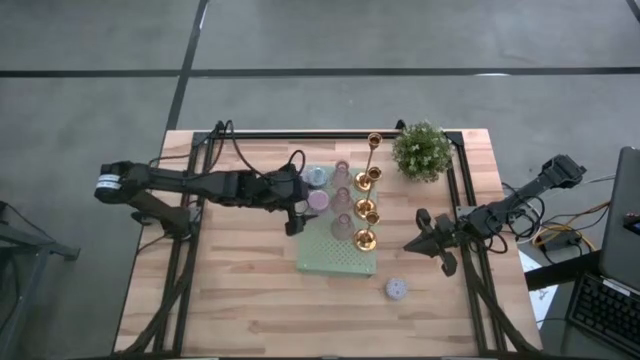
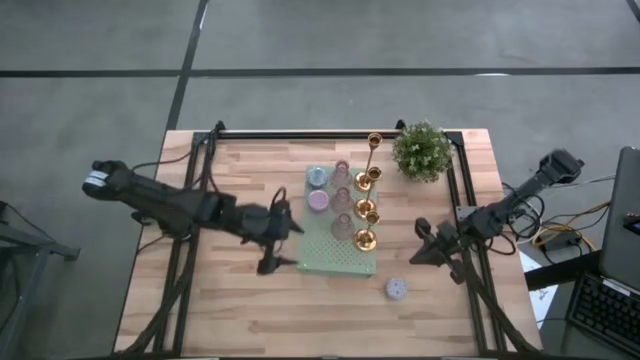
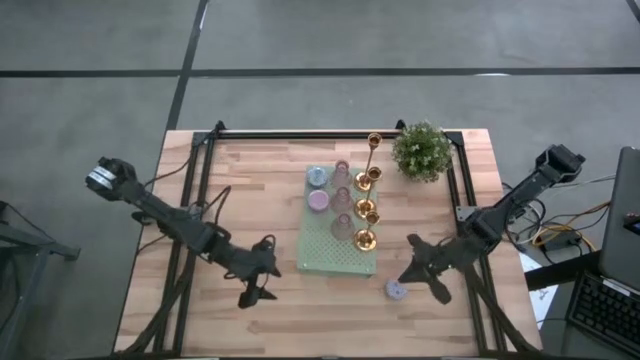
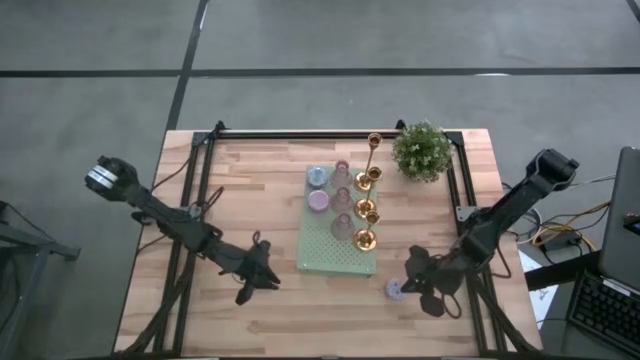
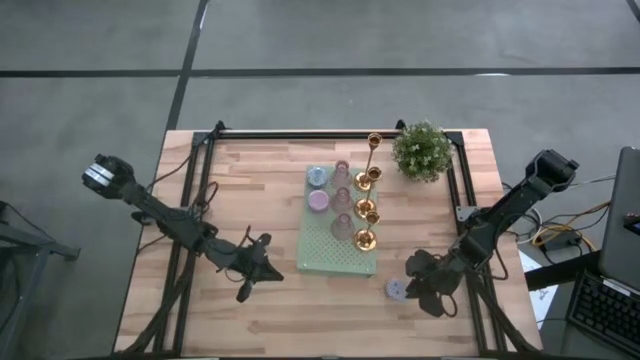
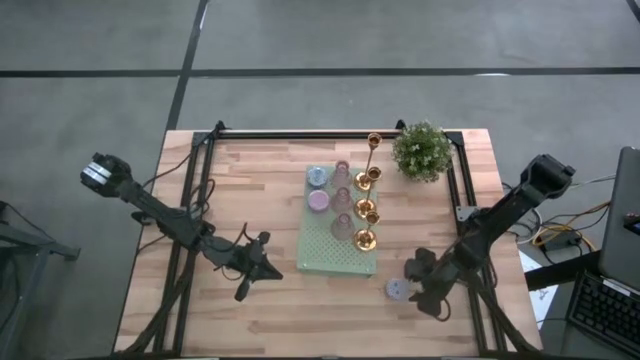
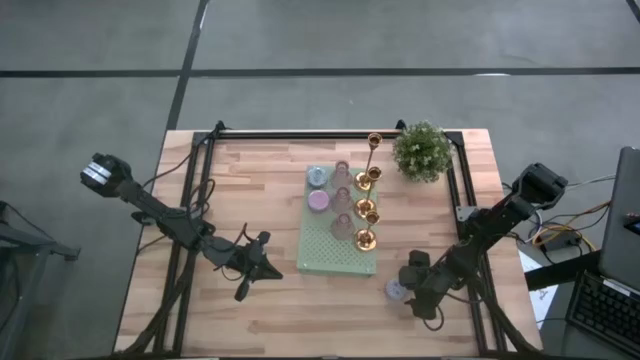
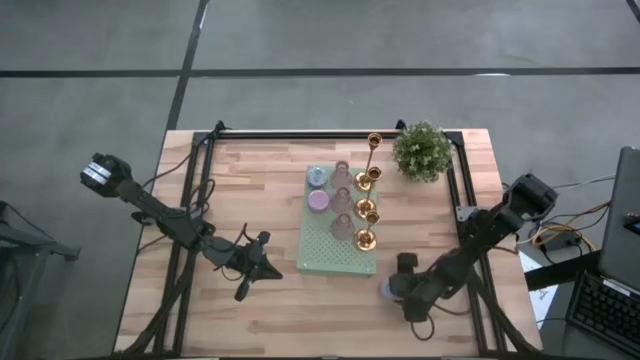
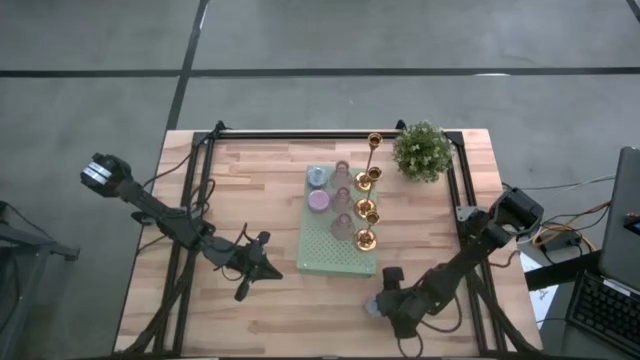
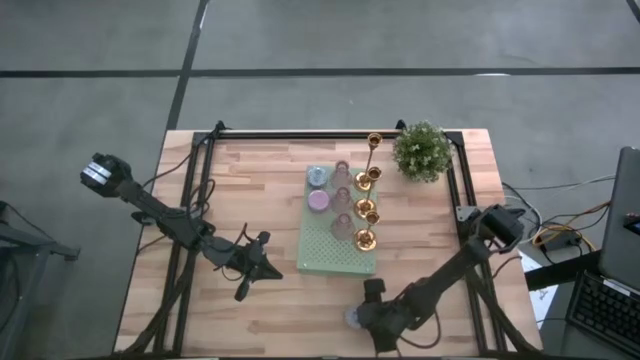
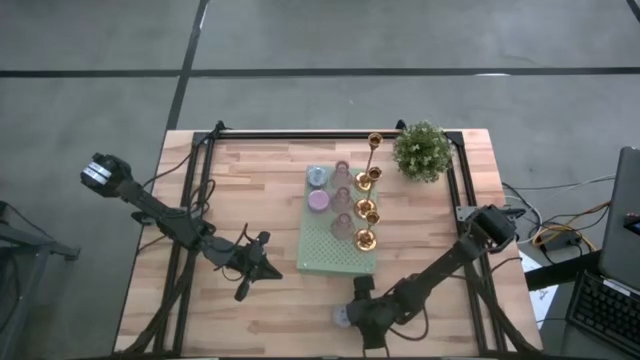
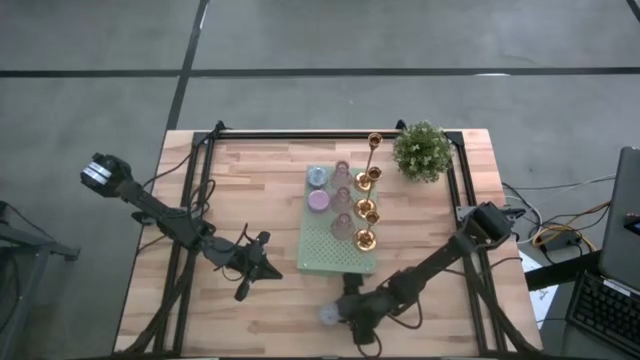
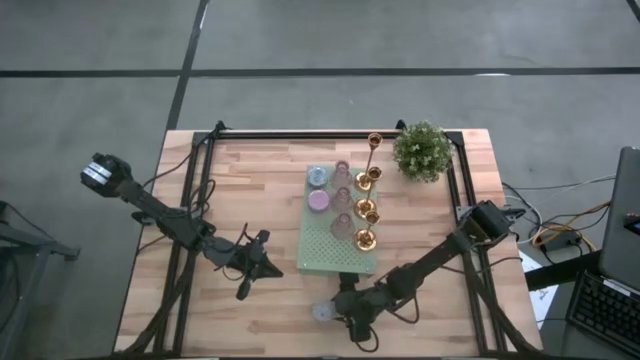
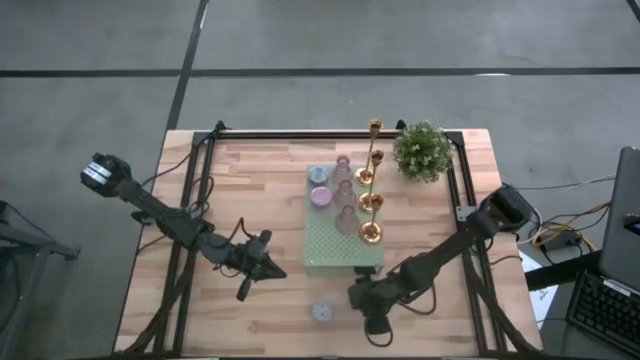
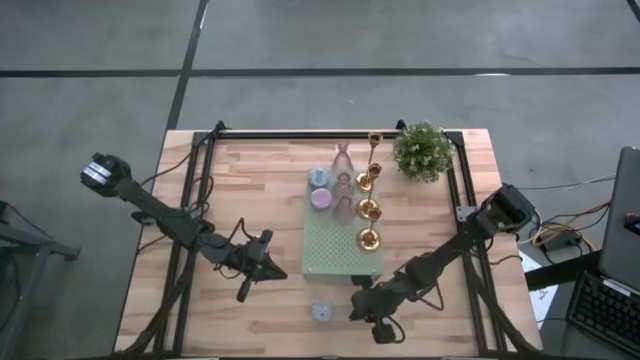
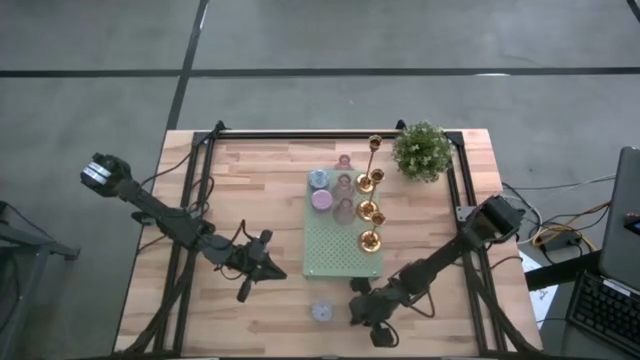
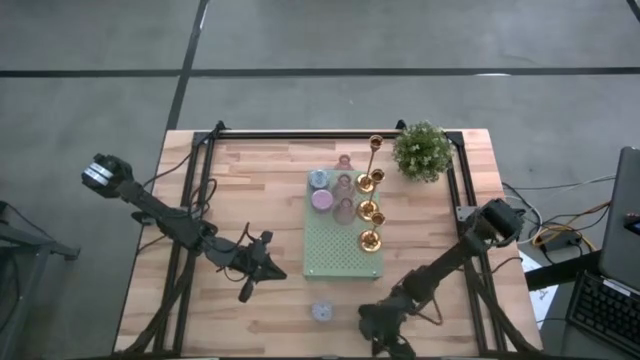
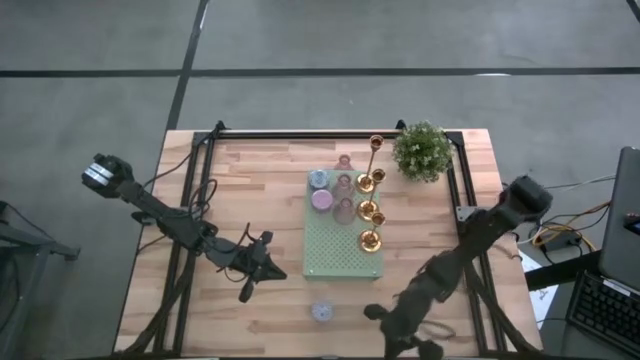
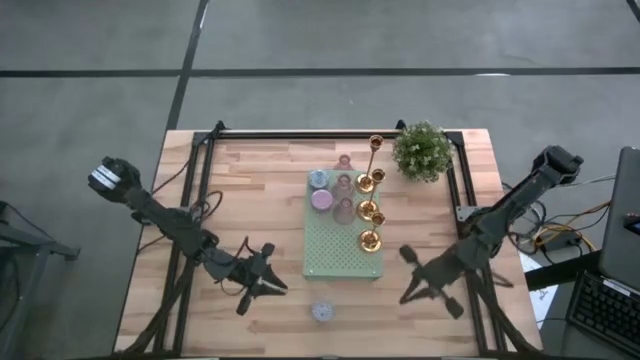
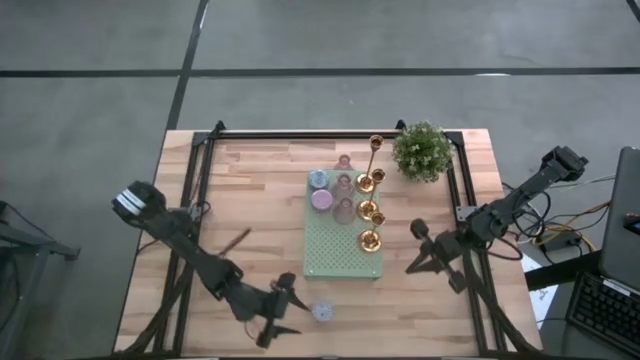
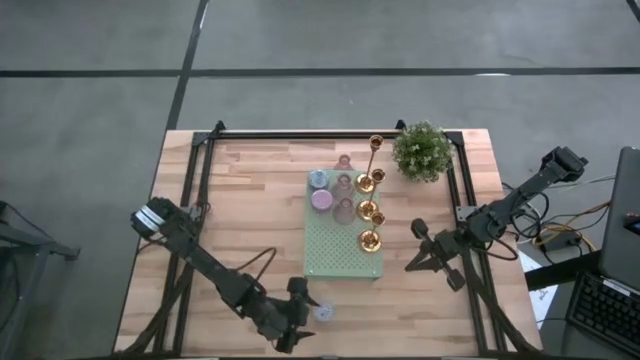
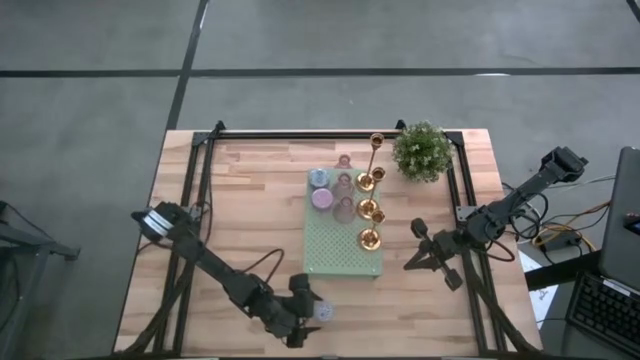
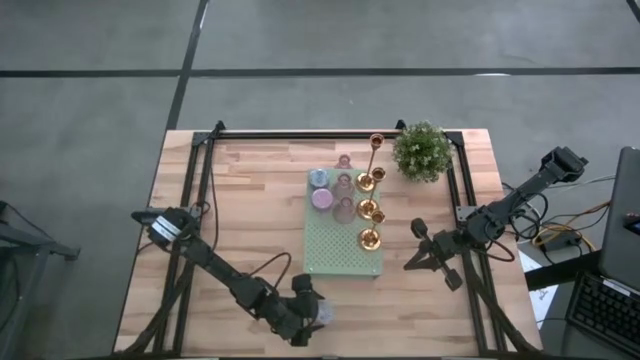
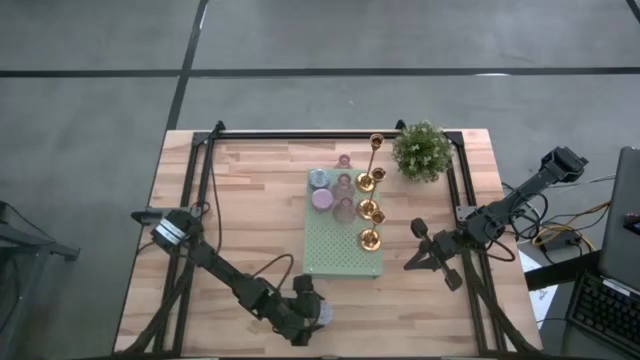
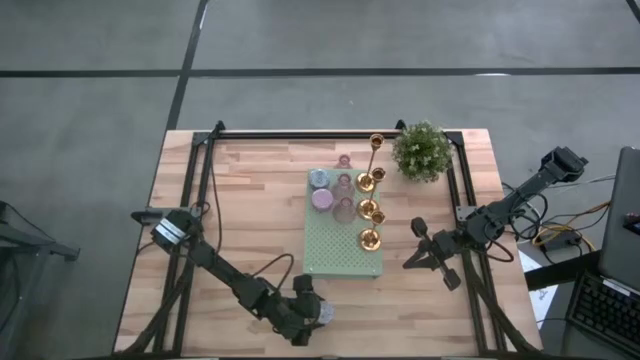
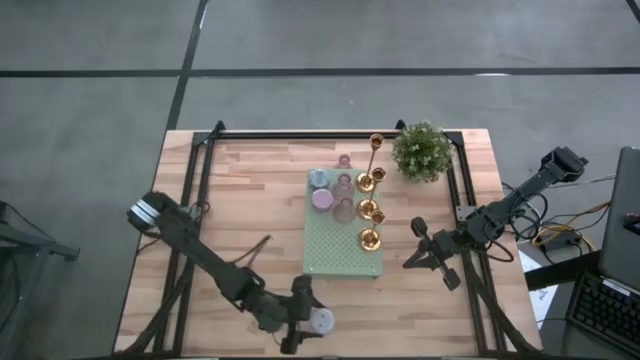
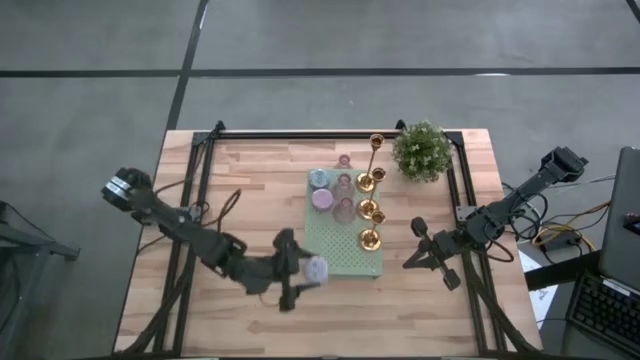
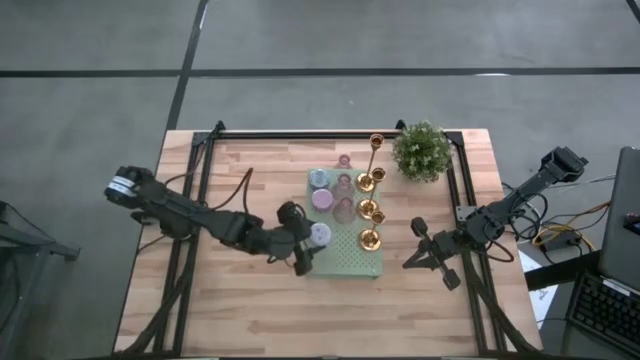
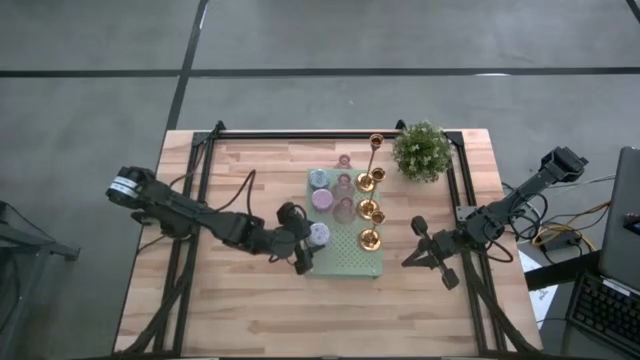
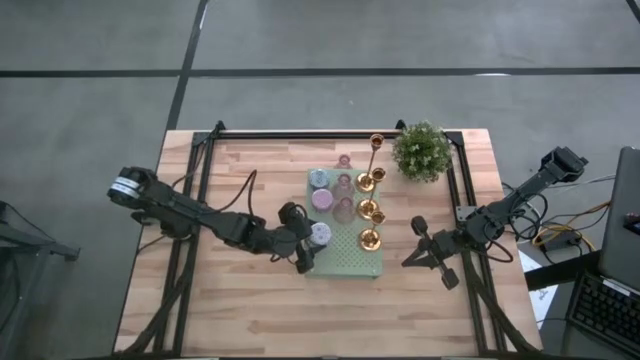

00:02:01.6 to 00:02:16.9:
Task: Pick & Place candle stick holders
Put the red patterned scented candle on the shelf aligned with the other purple patterned scented candle

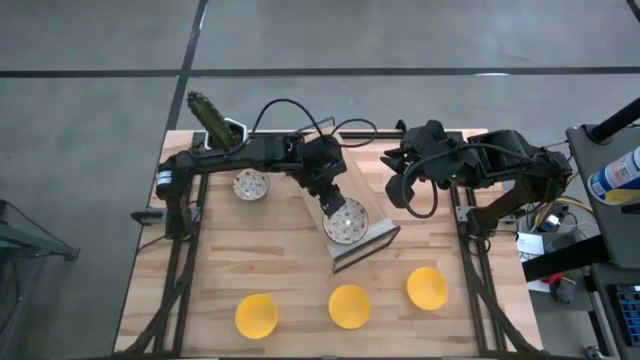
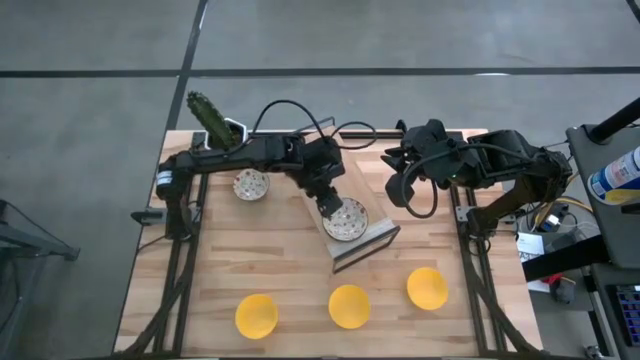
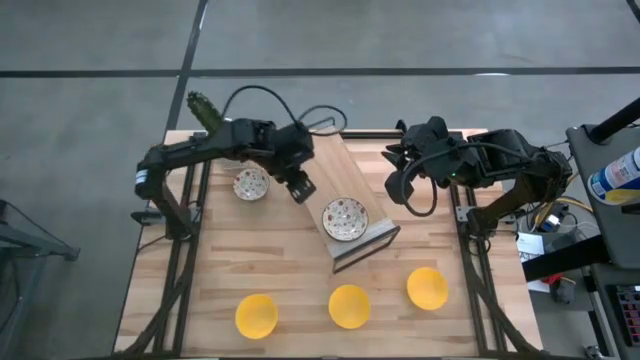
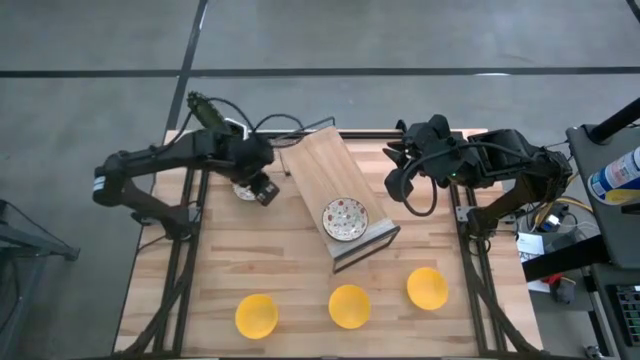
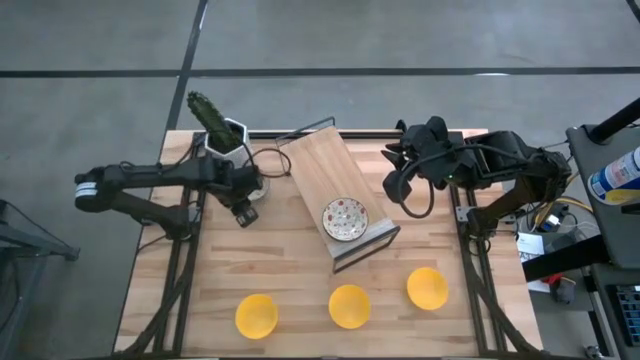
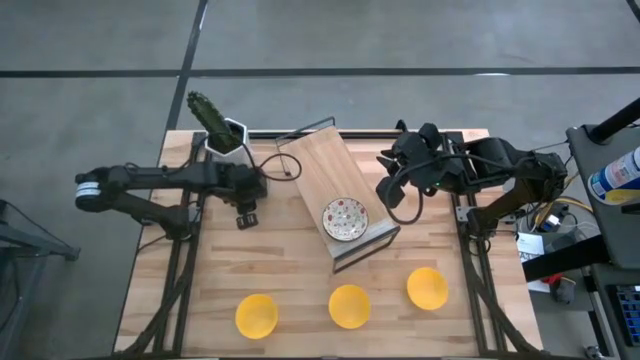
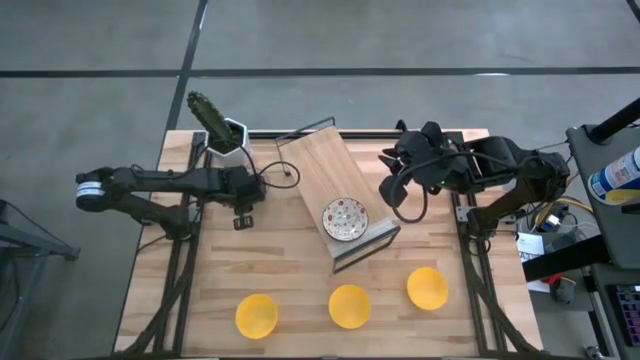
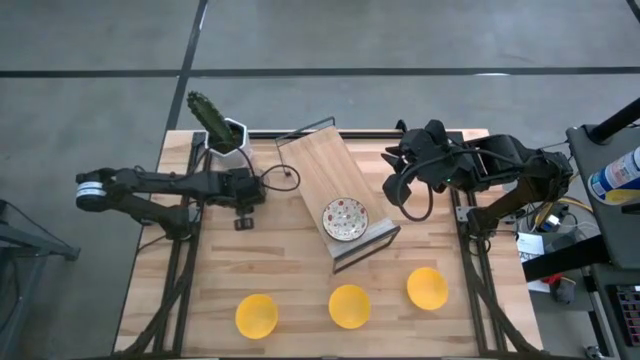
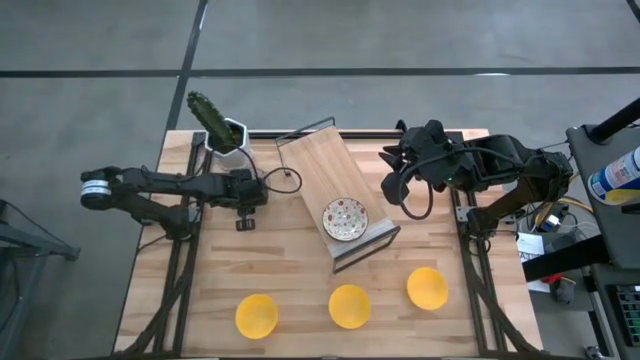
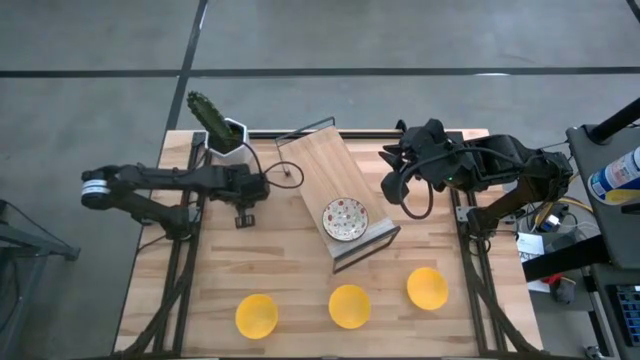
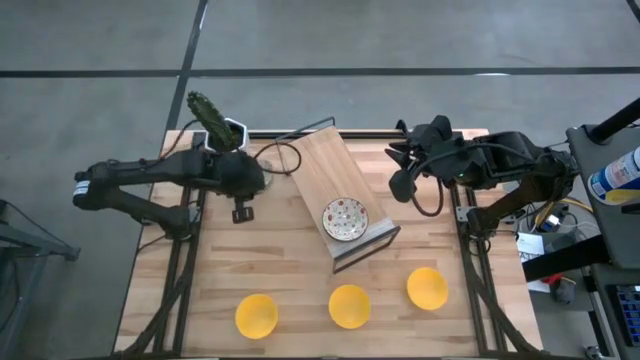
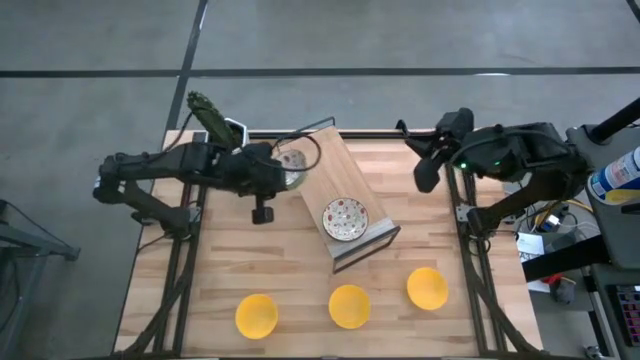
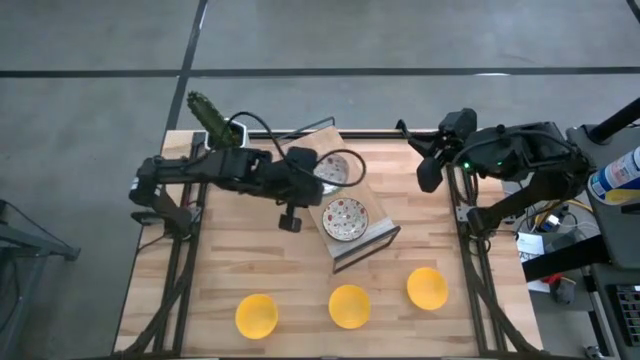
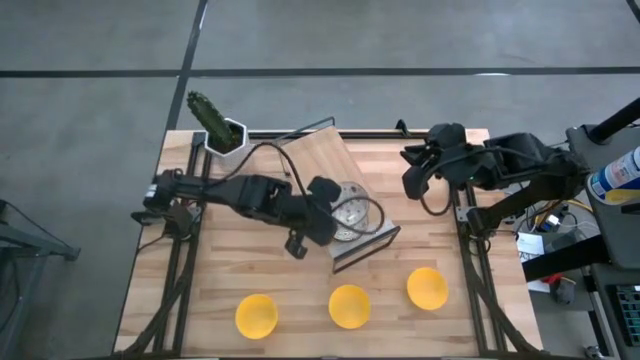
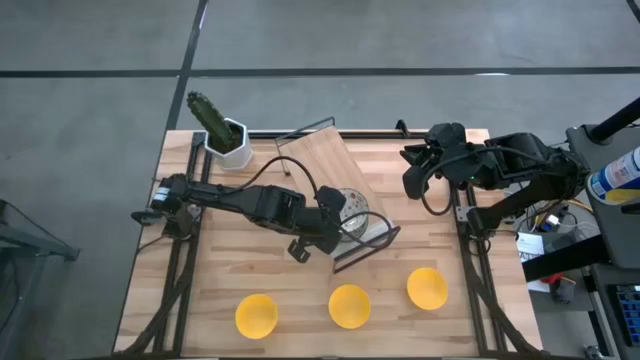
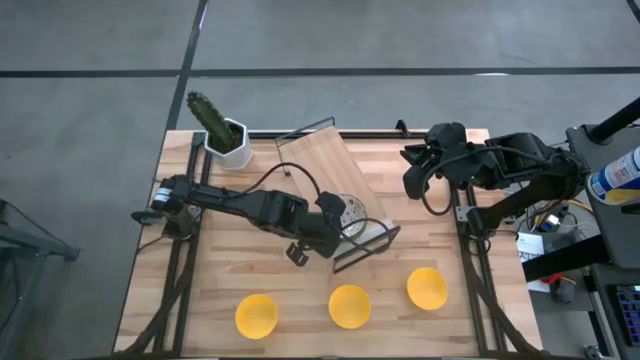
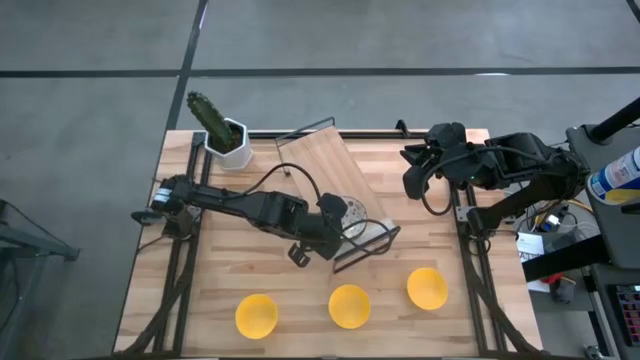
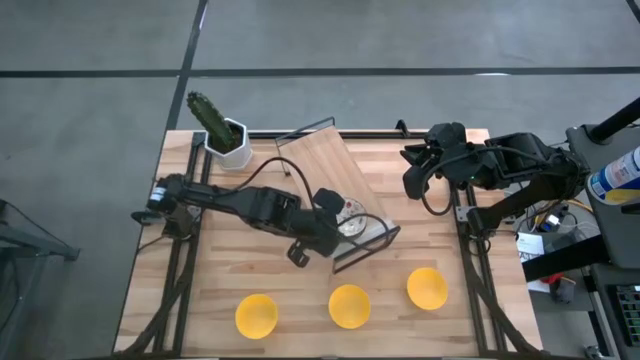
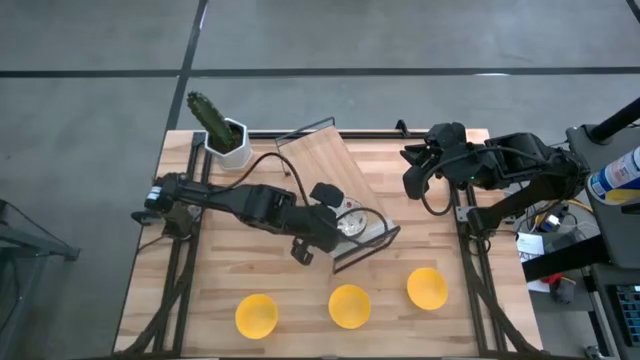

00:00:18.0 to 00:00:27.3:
Task: Pick & Place Mini bowls
Stack the patterned bowl on the other white patterned bowl on the shelf
